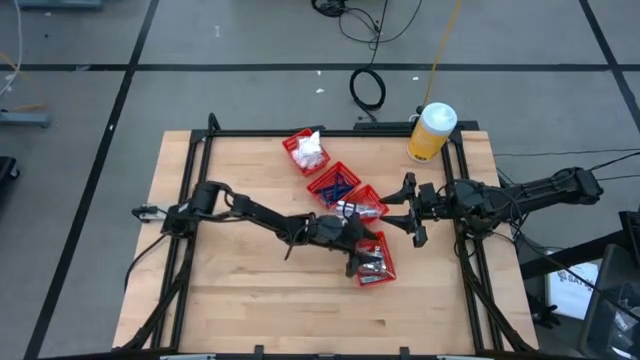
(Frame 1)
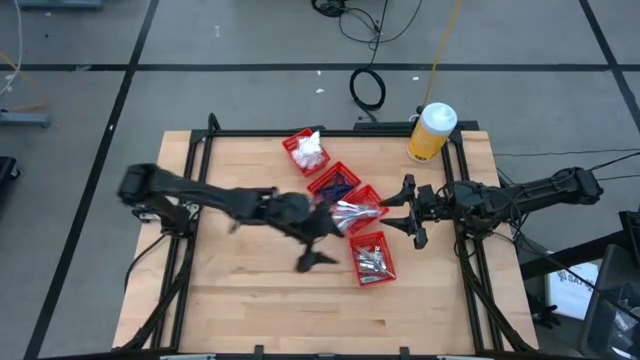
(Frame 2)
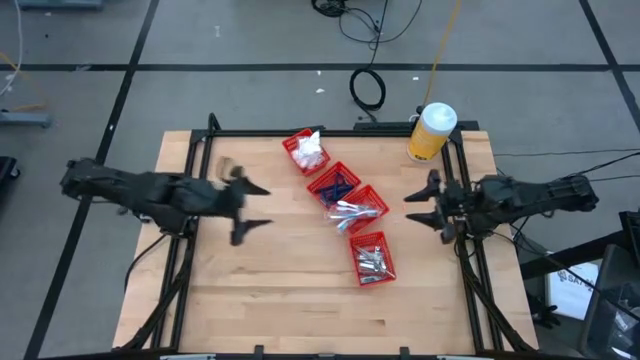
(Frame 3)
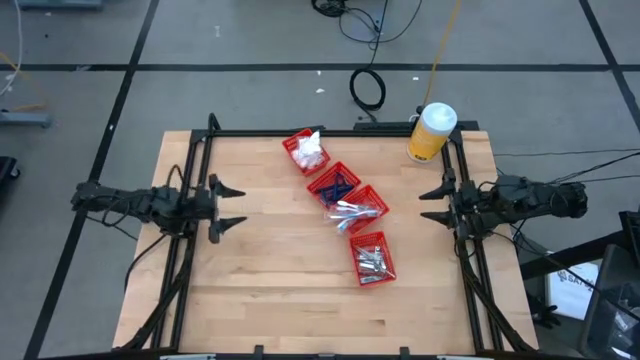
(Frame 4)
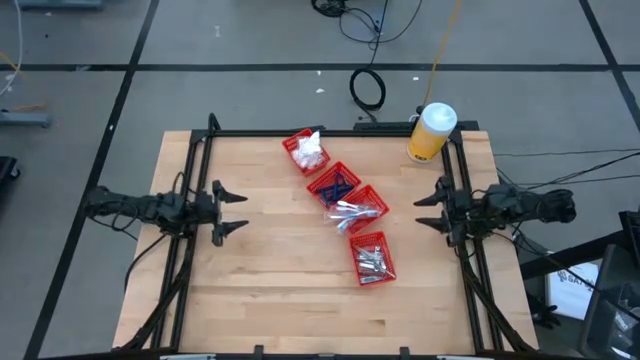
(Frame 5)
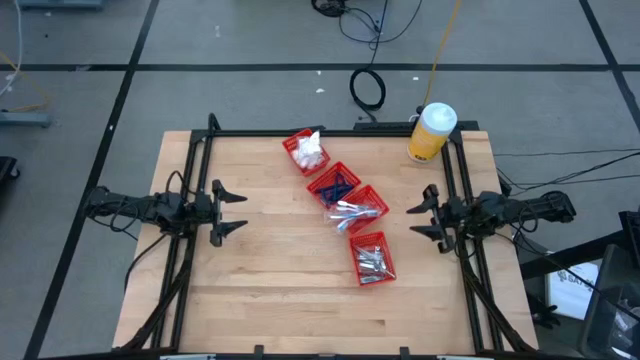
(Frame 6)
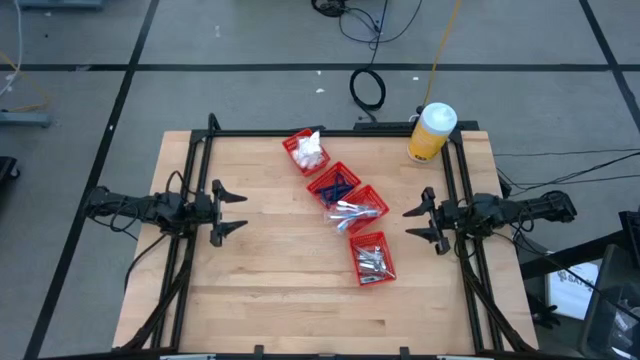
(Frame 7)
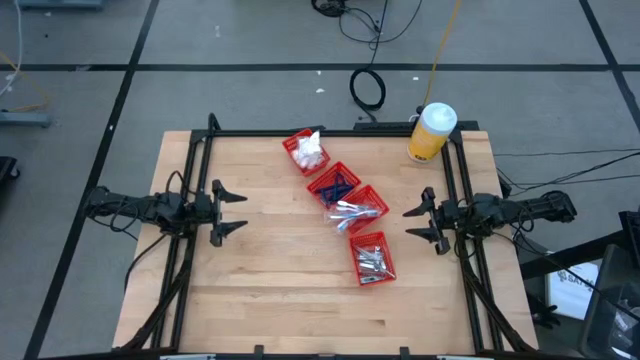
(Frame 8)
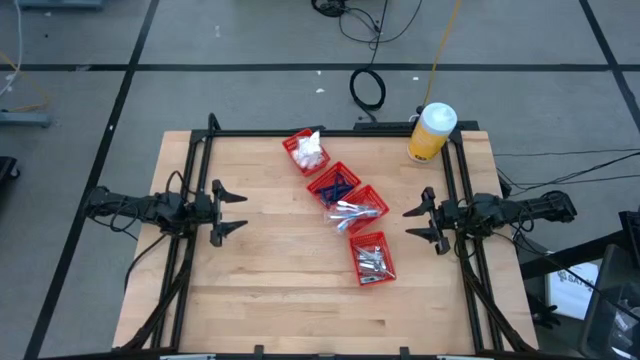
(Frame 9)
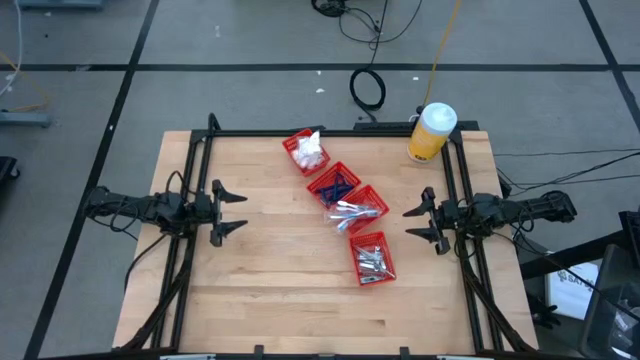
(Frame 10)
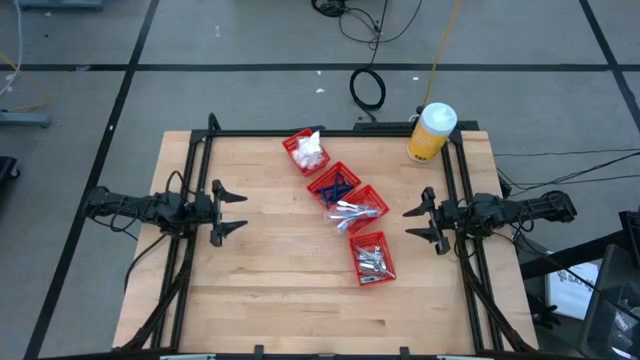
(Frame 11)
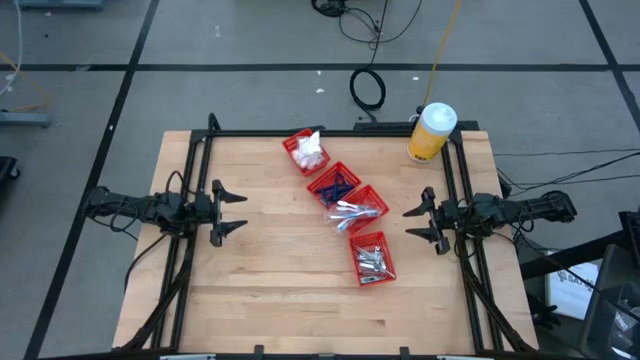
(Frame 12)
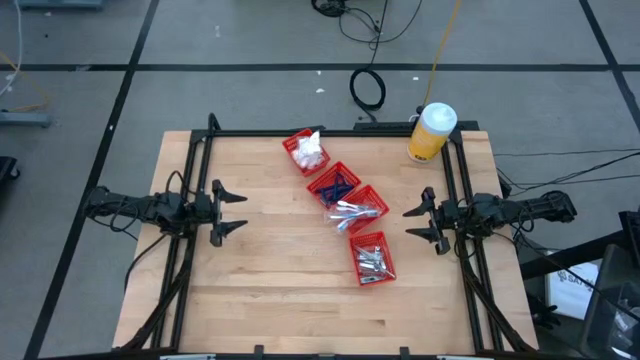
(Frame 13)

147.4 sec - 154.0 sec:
Task: Pick & Place Travel size toiletries
Return to Home Position

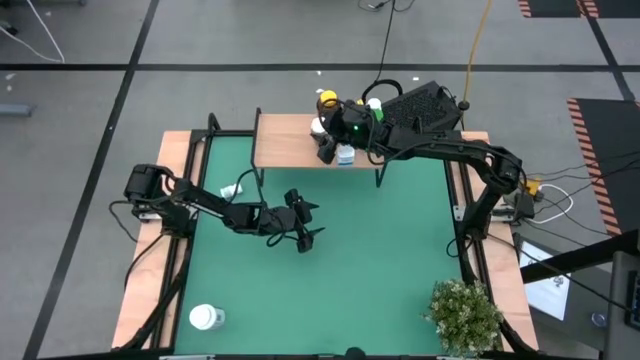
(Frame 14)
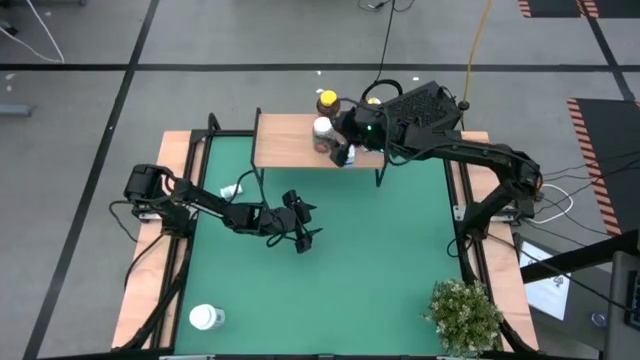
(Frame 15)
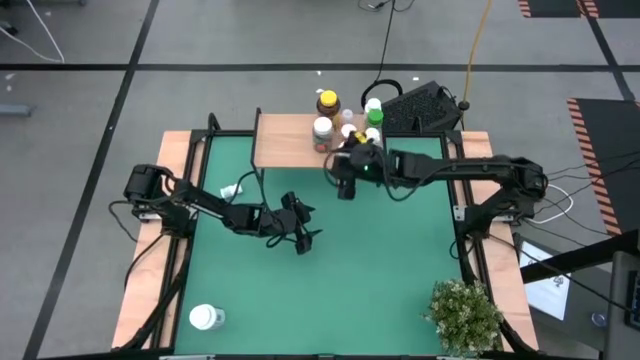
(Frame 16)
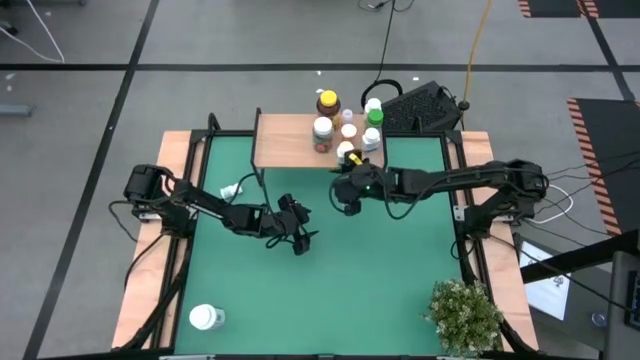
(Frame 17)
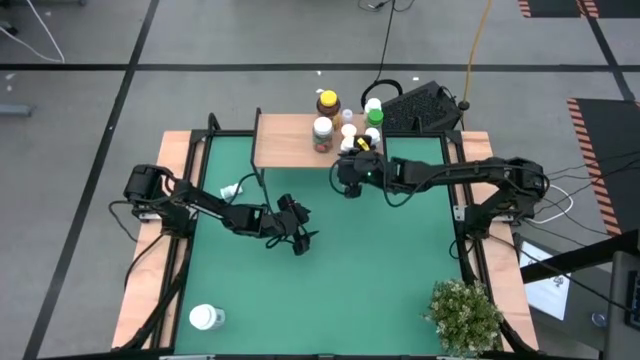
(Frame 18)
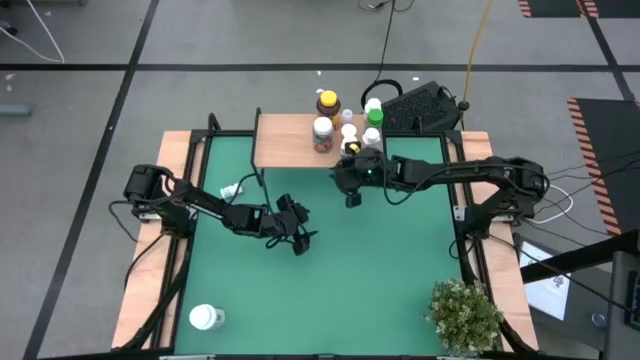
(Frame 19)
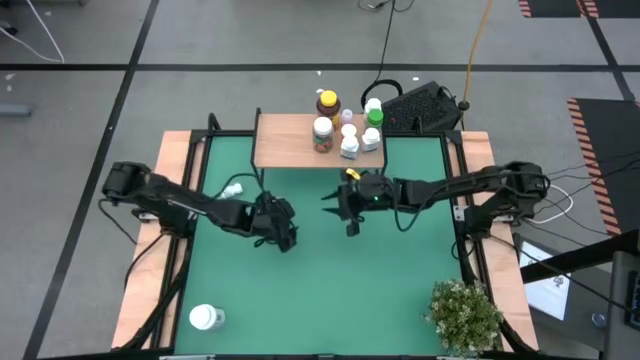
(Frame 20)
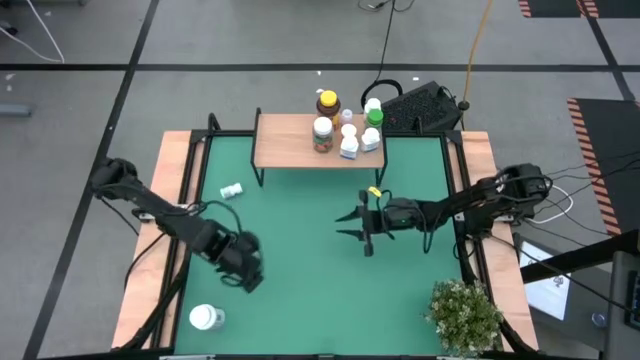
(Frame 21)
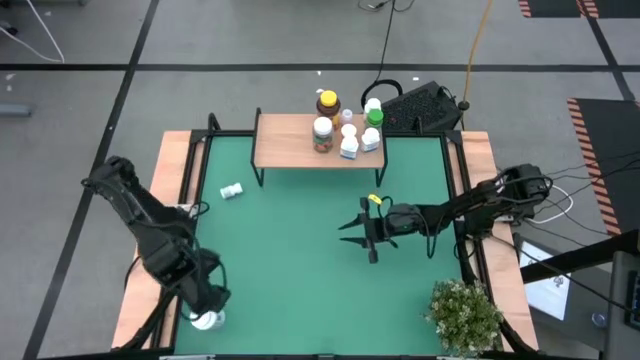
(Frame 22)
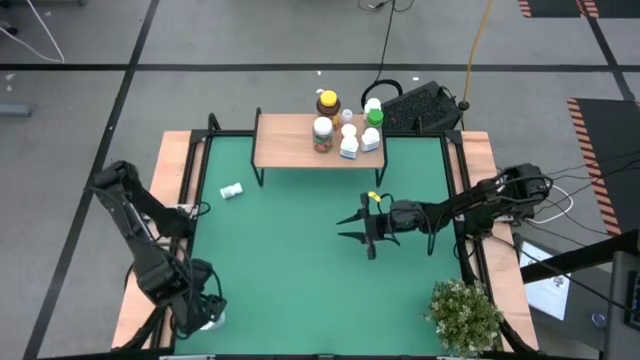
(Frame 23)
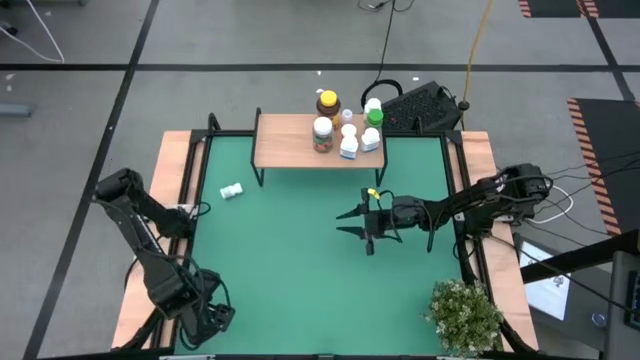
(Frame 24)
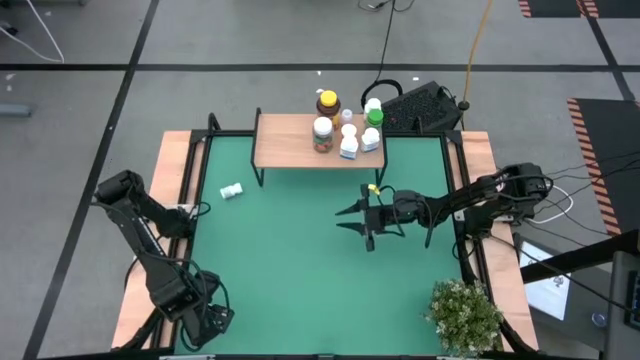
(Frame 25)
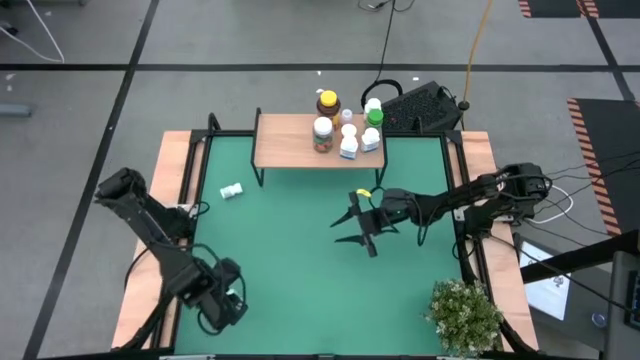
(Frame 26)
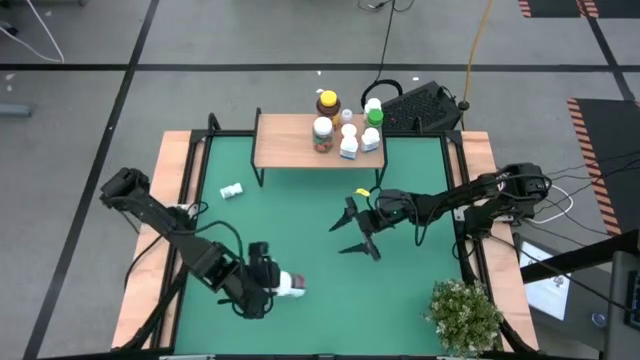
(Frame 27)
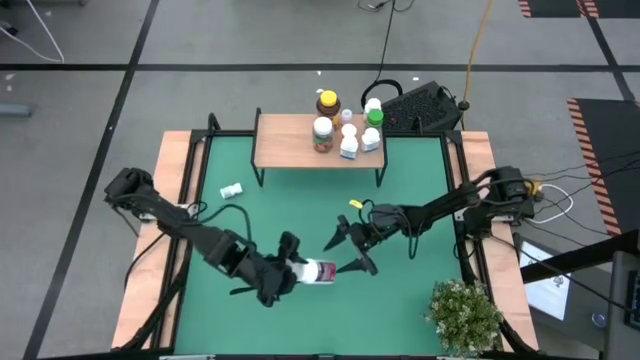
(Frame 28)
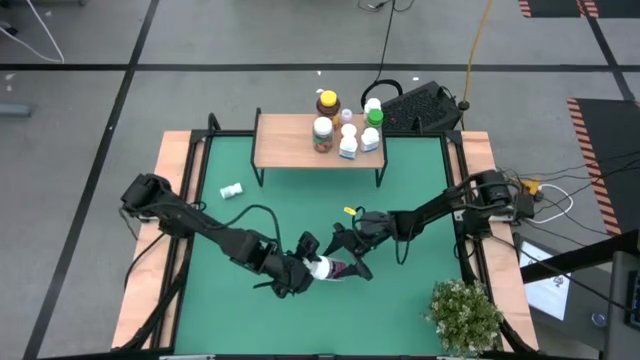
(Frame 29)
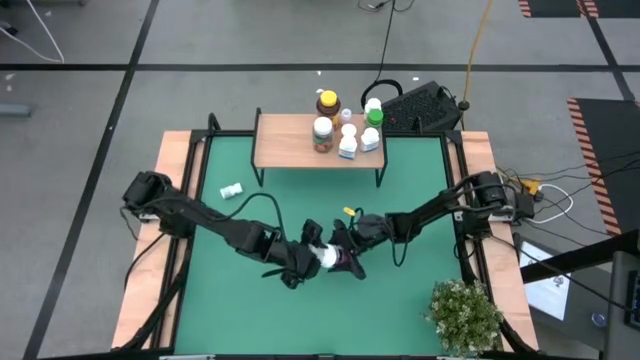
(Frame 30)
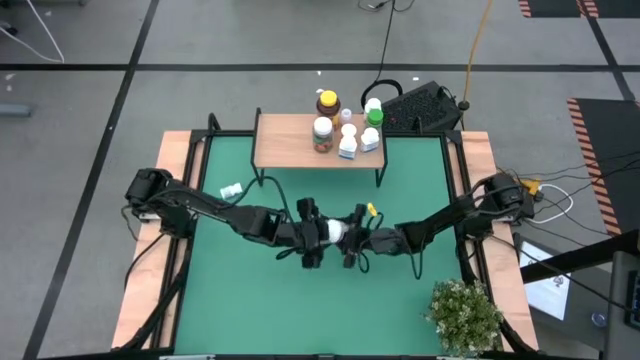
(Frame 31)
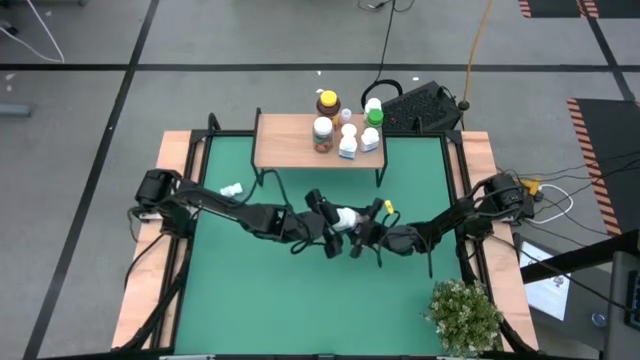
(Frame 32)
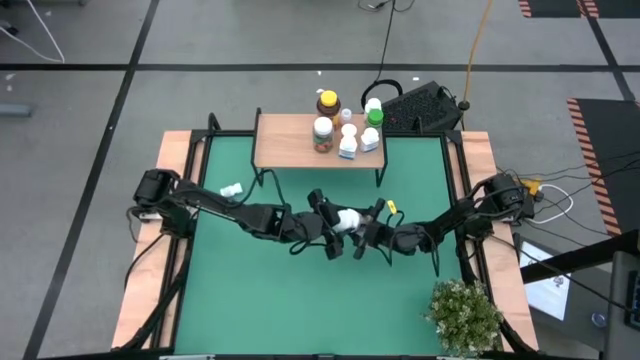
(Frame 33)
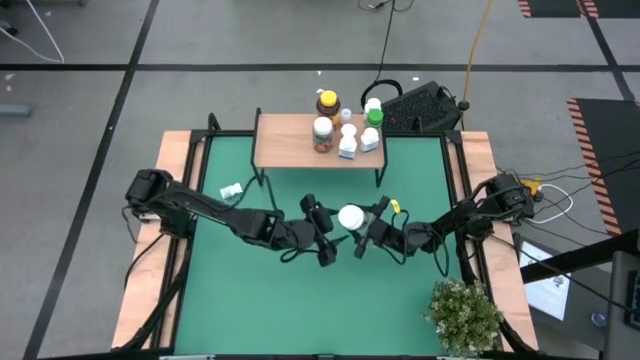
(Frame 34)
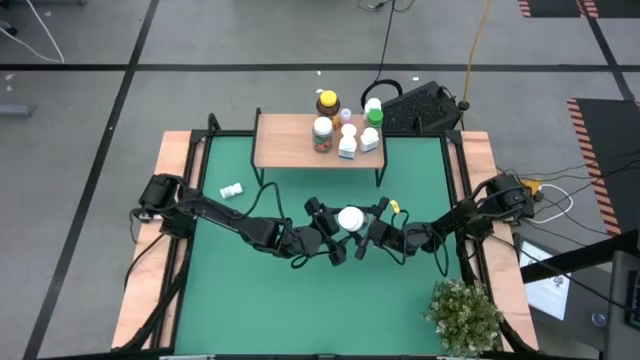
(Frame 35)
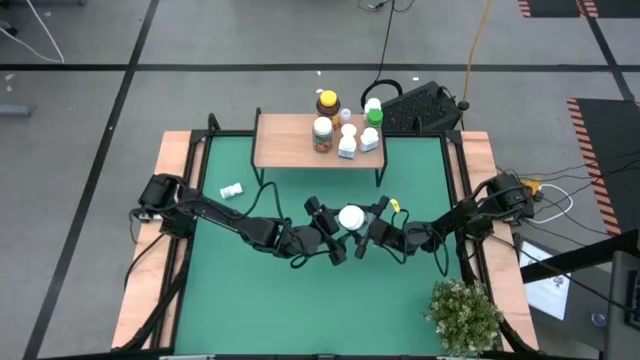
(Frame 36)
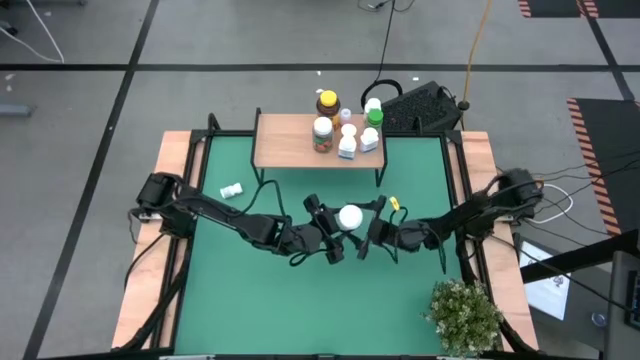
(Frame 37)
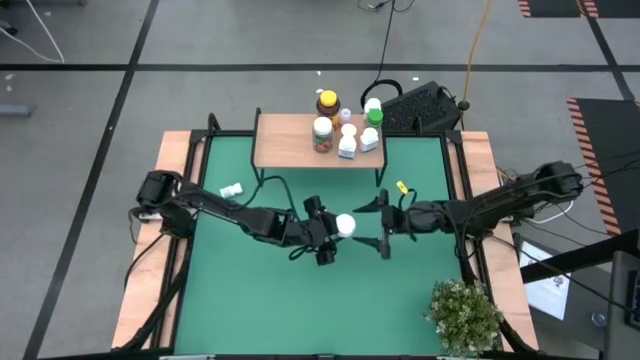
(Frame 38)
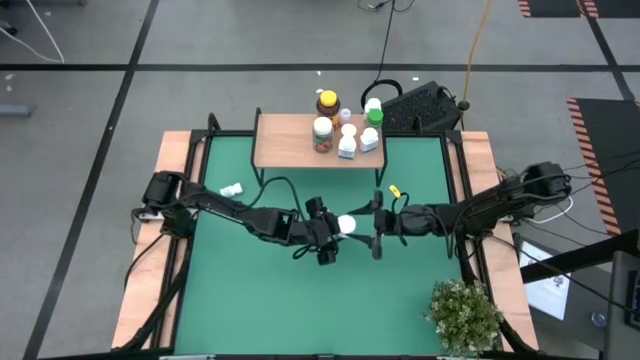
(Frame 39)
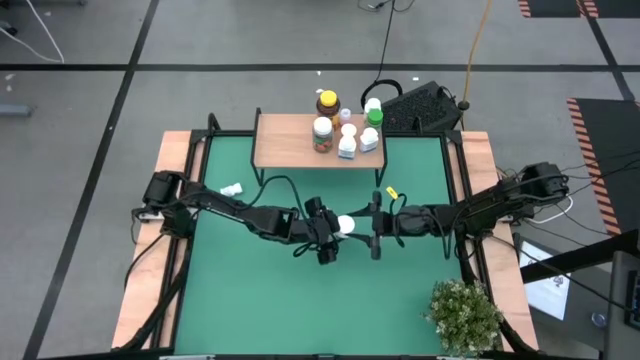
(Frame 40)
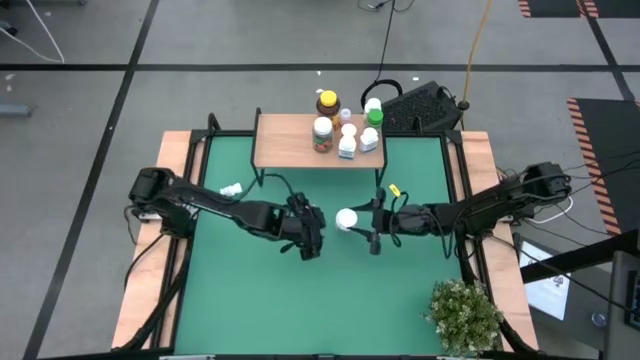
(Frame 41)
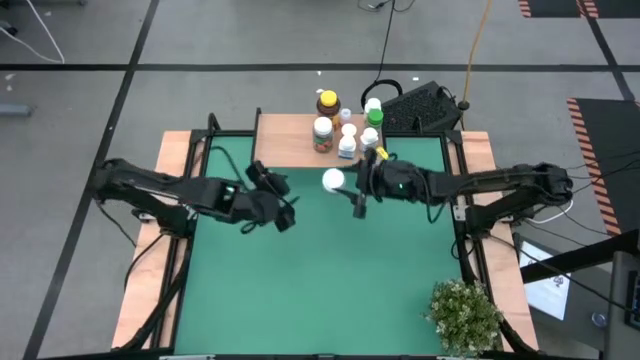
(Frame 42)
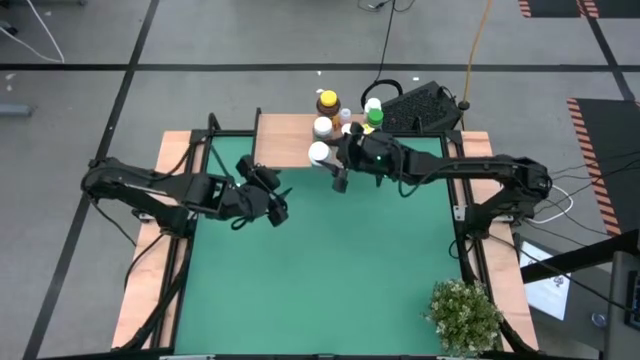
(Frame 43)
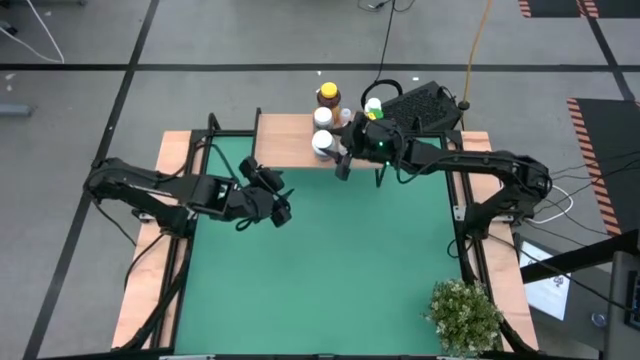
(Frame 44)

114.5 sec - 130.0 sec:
Task: Pick and place medicine bottles onto shelf by color
Put the white medicine bottle on the shelf
